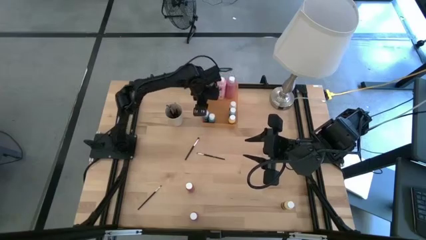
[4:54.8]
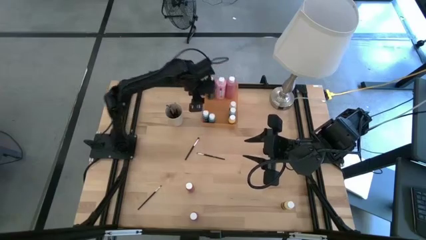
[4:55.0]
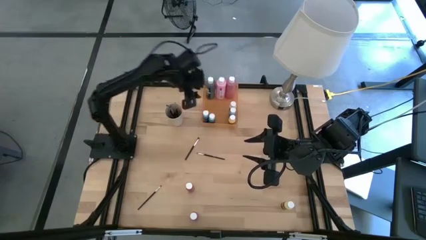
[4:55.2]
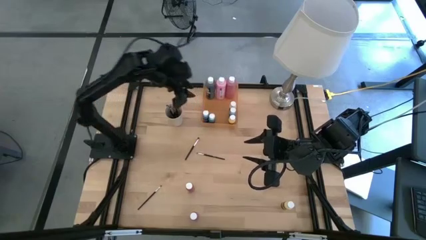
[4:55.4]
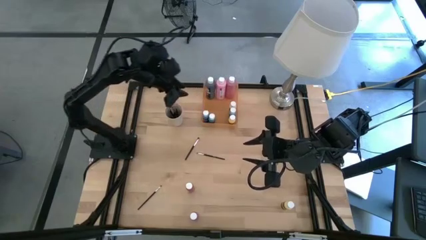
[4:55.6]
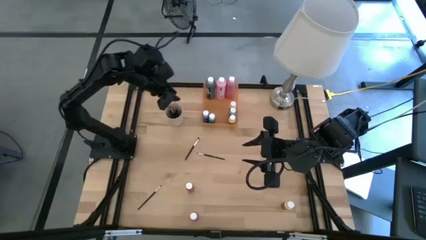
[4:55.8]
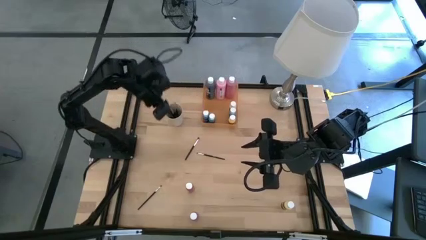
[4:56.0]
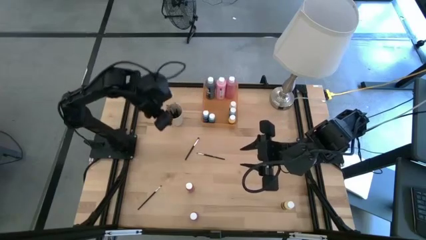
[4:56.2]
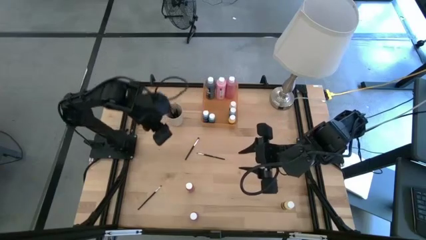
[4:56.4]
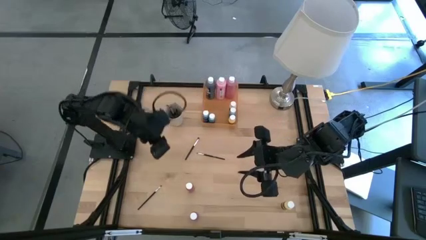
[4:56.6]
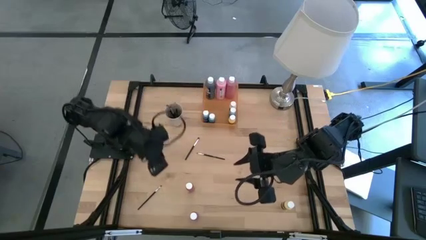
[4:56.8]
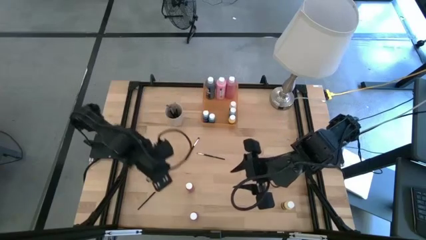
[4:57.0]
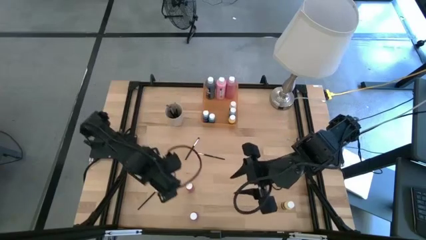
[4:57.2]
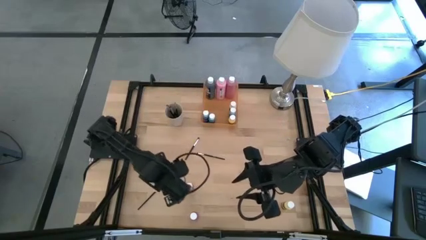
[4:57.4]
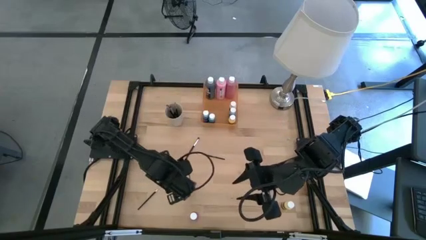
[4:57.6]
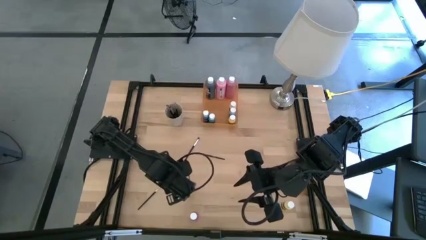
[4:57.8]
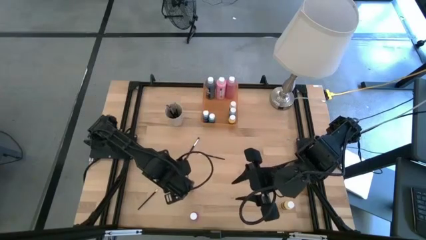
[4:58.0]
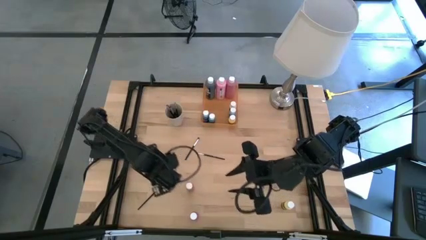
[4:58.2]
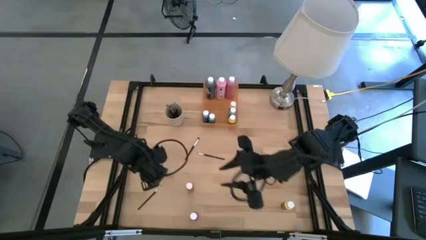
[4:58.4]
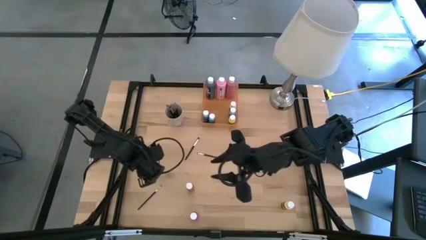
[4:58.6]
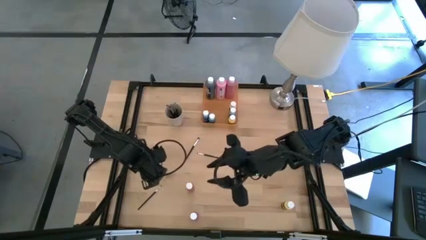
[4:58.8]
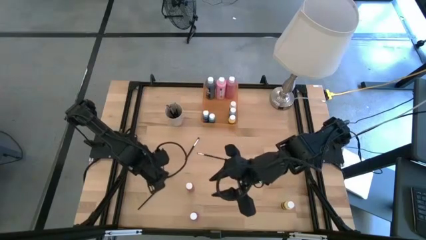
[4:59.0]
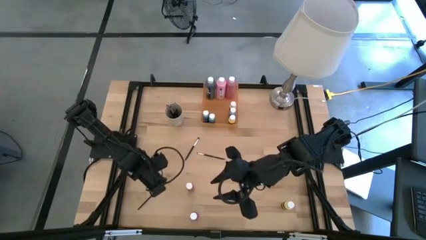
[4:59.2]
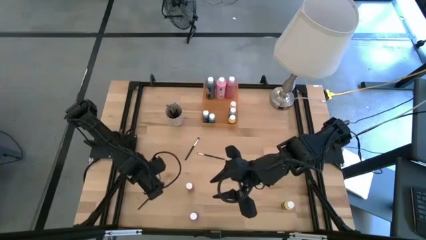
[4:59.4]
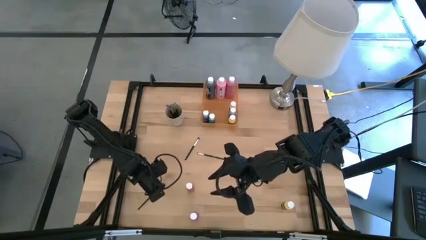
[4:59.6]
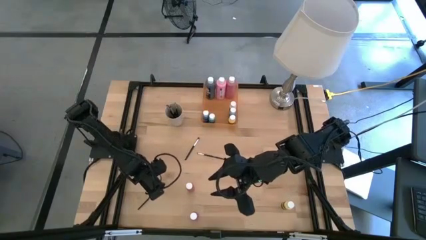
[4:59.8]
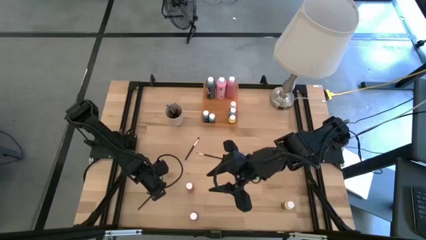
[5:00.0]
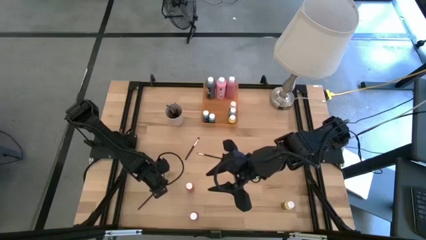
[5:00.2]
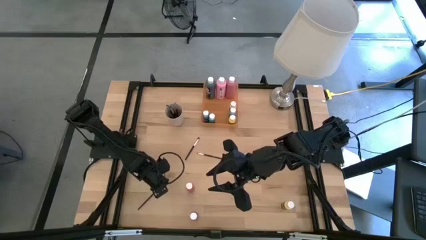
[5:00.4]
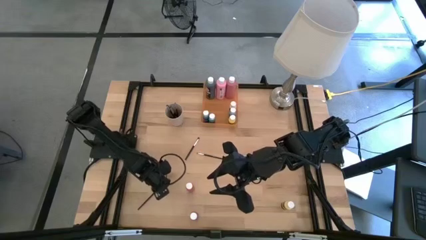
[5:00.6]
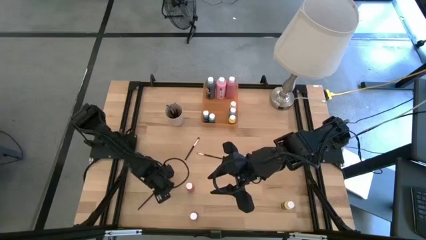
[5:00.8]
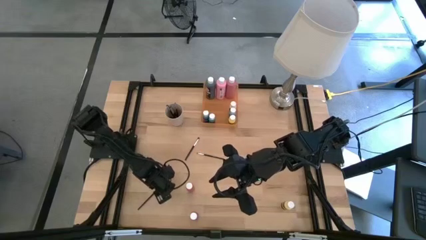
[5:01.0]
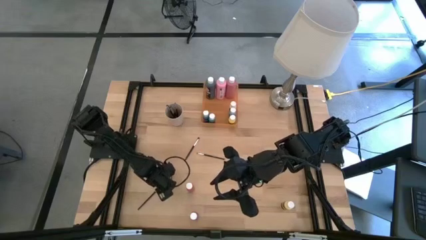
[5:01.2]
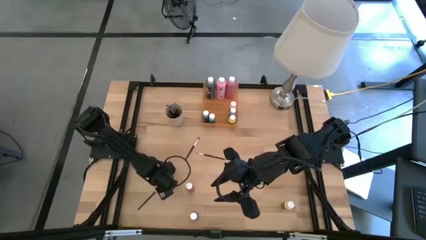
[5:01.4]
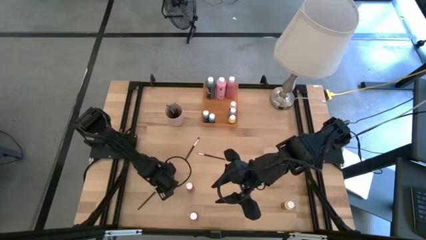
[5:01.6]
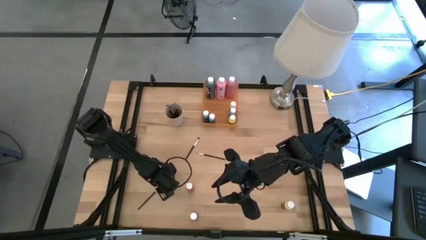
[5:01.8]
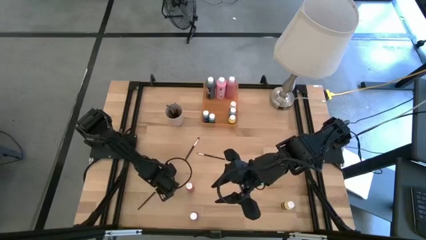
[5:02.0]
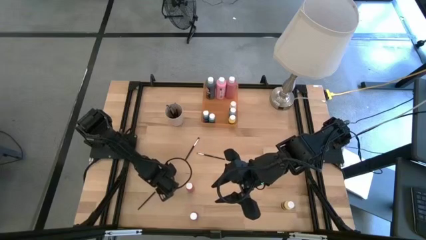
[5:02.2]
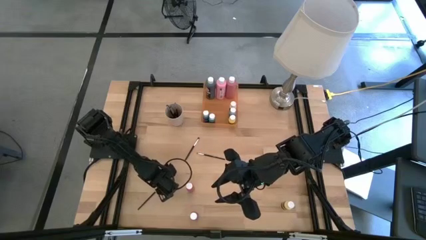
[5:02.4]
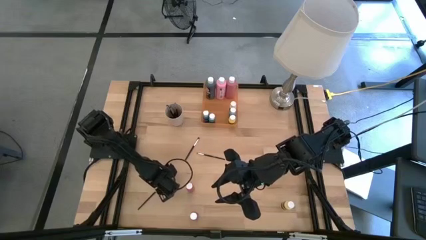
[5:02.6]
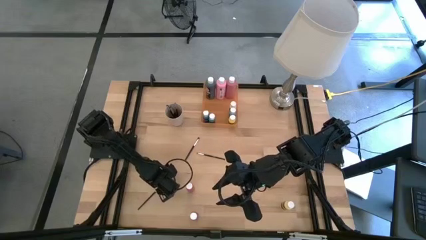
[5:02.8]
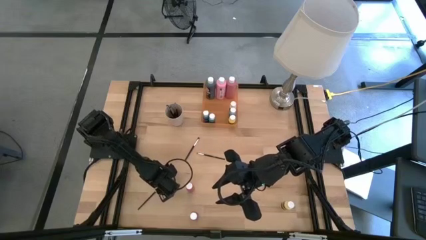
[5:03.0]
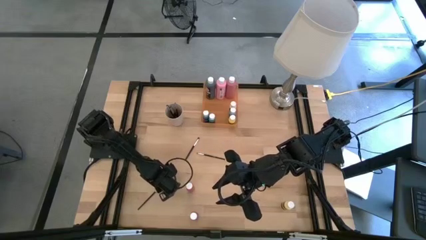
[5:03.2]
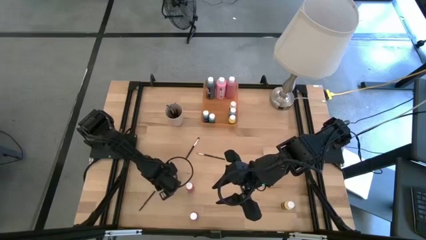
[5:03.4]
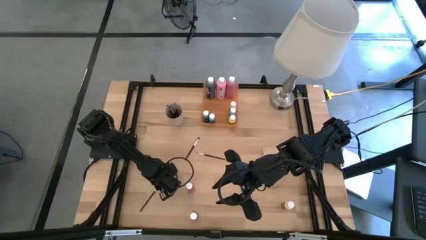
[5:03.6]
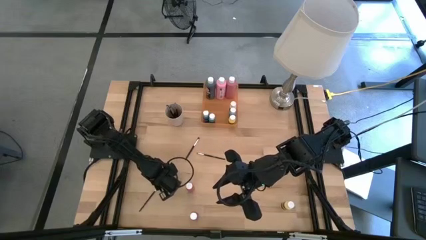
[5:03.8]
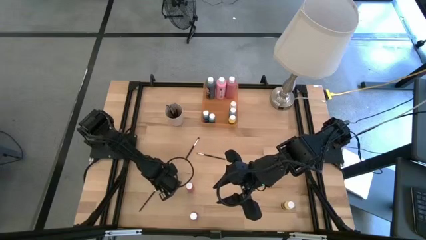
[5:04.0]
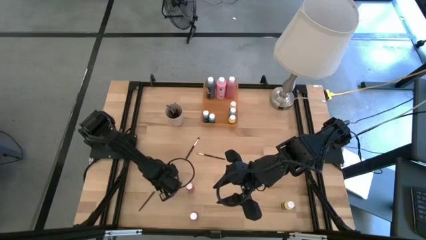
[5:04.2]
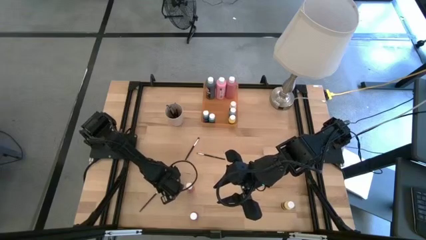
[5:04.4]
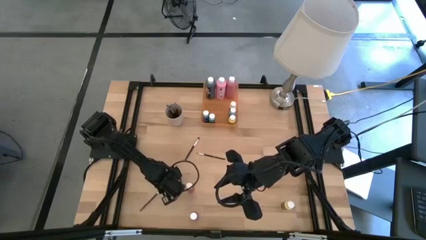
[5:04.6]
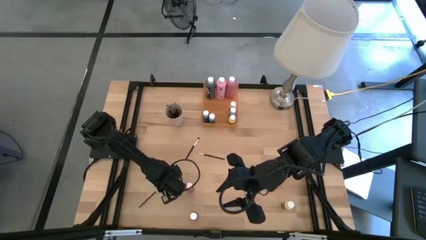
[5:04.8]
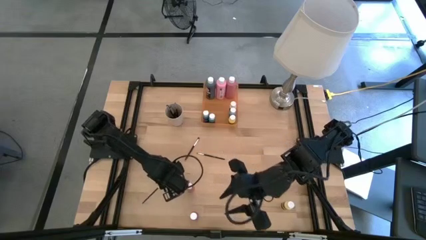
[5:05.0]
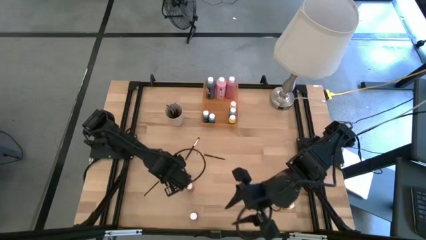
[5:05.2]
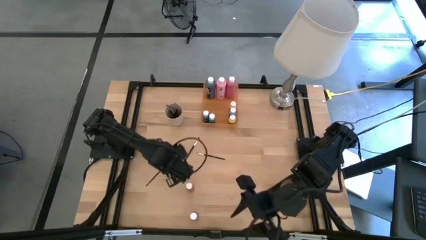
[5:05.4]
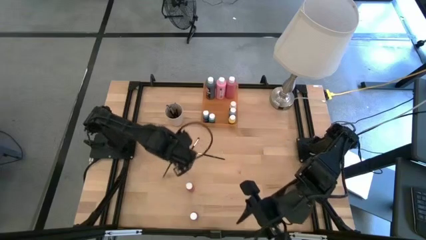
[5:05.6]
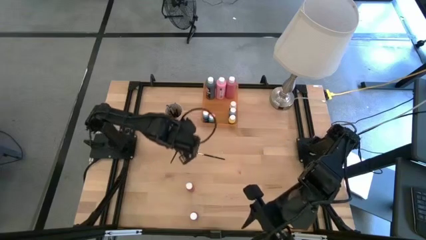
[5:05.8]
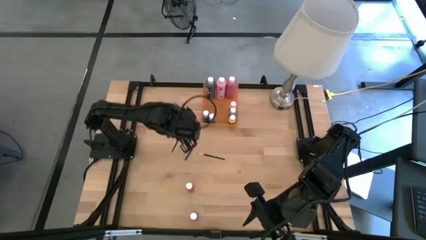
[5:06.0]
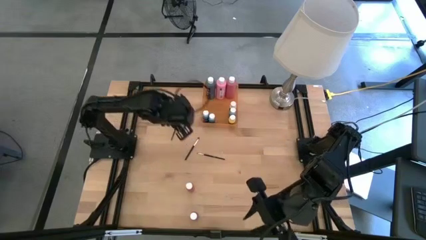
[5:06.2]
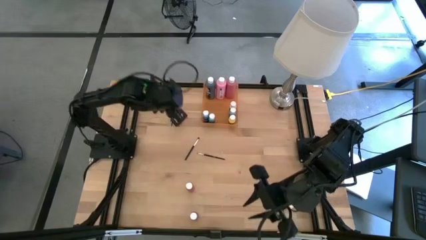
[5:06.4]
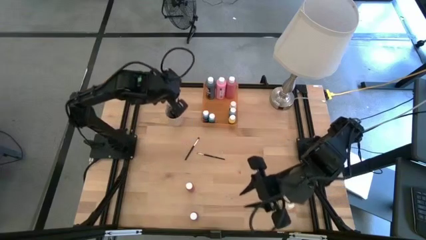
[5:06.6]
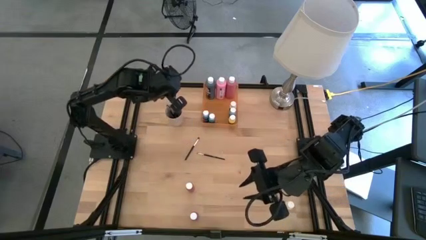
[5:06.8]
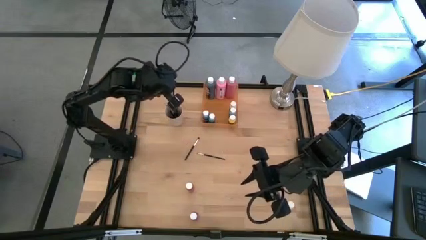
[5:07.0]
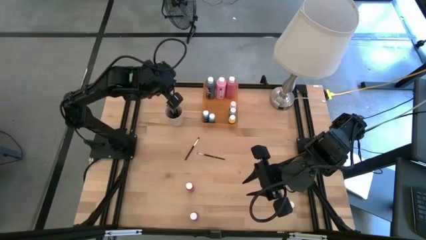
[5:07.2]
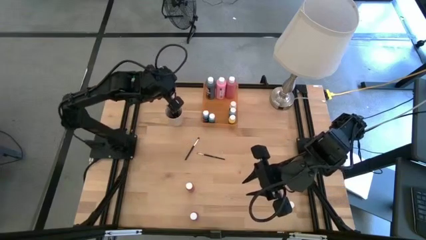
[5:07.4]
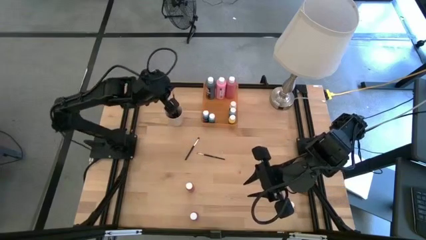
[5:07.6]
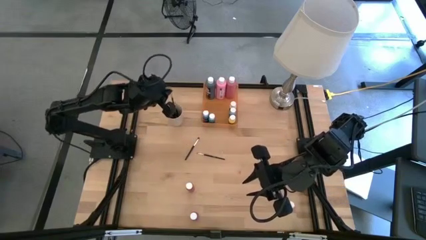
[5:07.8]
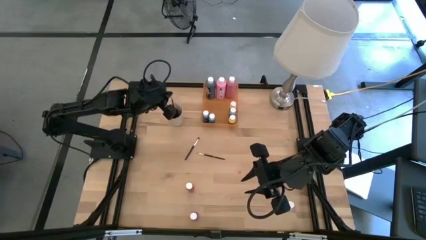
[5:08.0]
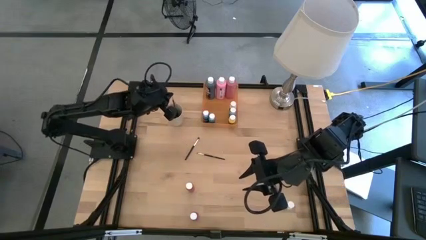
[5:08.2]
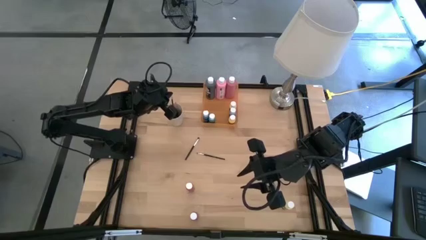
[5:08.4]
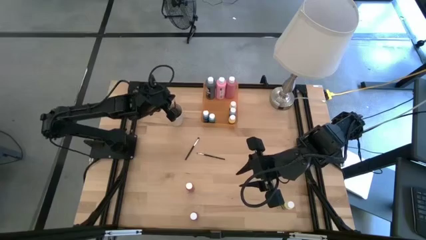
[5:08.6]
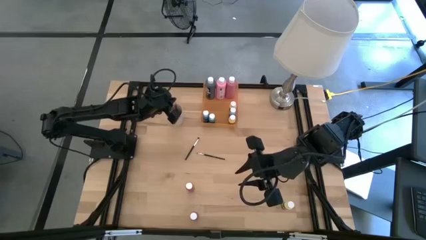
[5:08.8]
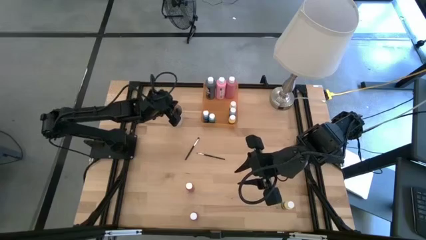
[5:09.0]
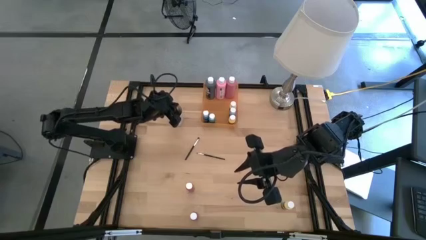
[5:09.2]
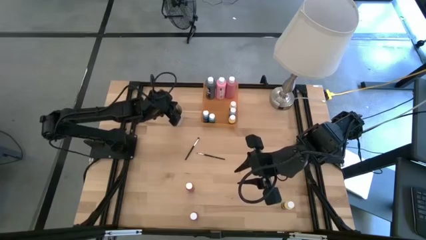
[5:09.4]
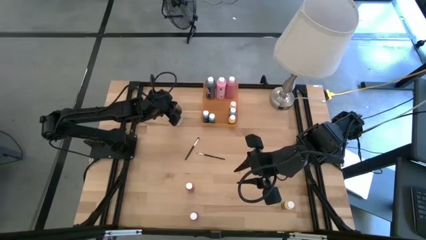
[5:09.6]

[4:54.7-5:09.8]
Task: Pick & Place Paint Supplies
Put the black paint brush into the white cup

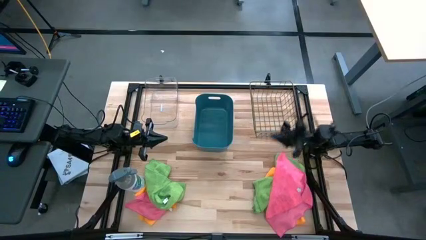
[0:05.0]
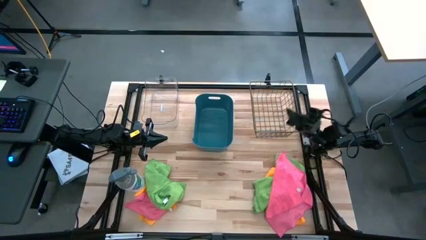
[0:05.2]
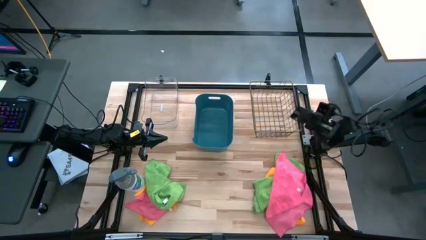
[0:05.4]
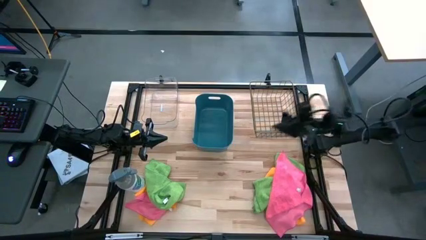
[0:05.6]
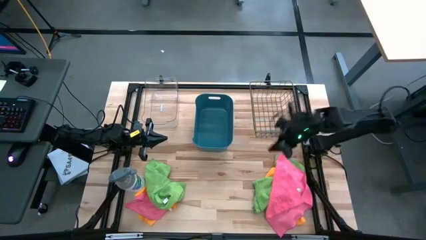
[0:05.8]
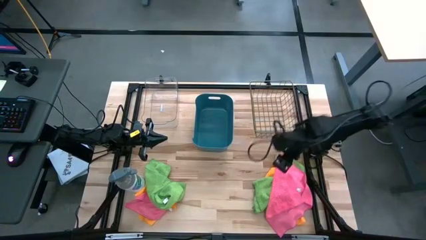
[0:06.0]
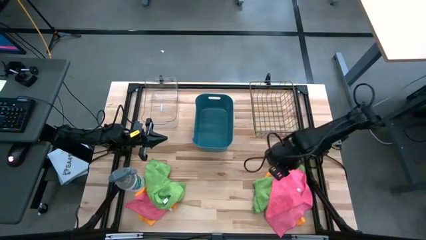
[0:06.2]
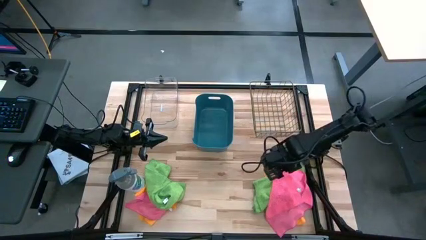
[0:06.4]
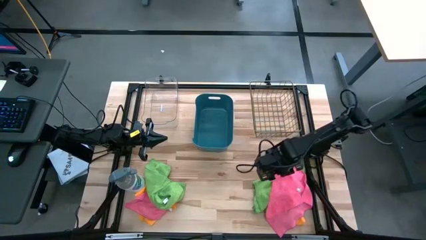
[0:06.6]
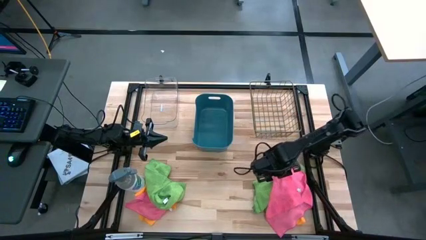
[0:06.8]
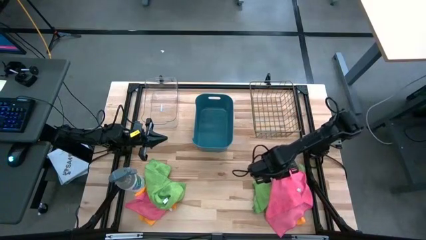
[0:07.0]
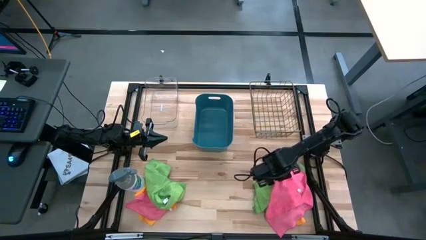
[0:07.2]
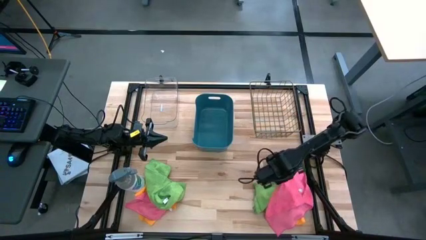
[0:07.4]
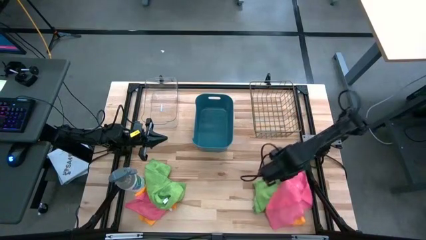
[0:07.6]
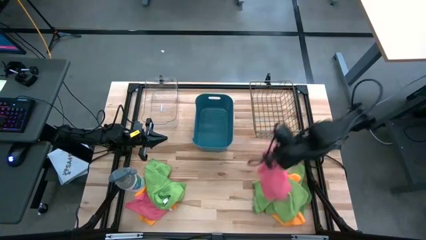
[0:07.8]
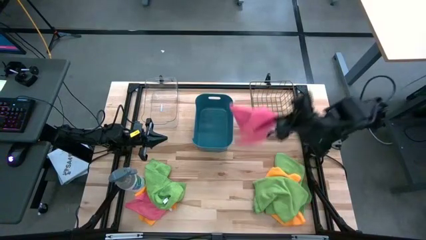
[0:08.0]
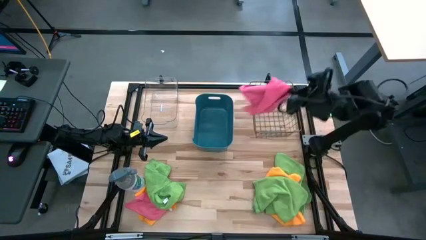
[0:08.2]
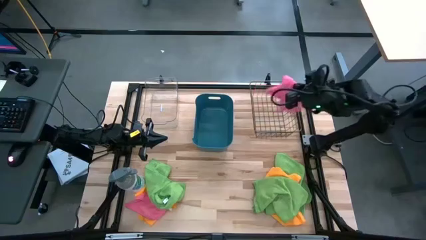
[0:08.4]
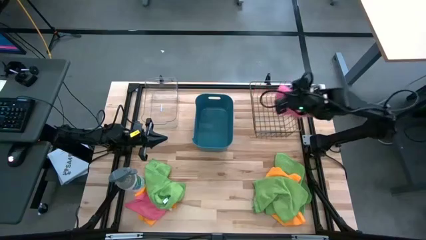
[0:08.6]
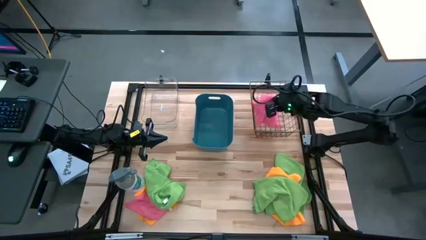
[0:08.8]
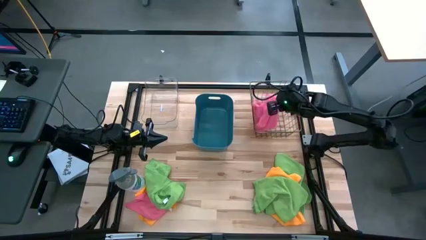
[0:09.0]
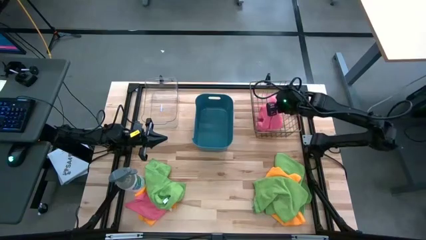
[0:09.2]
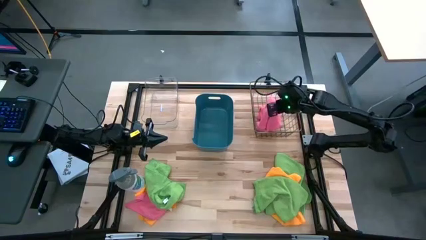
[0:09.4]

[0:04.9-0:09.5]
Task: Sort microfiber towel by color & place in baskets
Put the right pink microfiber cloth into the wire basket
